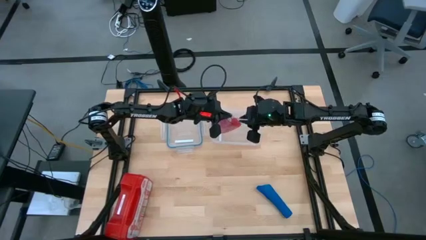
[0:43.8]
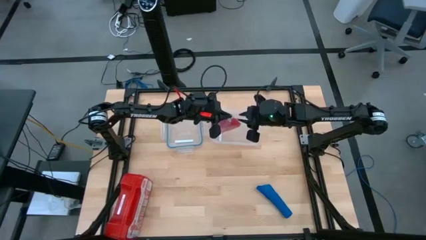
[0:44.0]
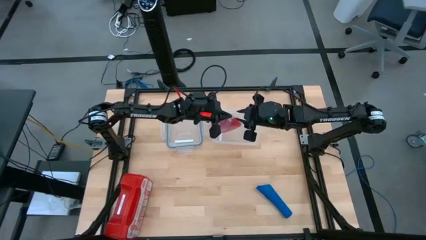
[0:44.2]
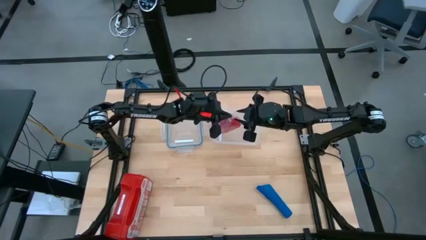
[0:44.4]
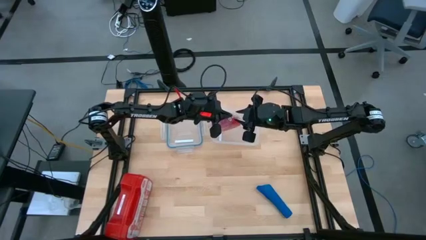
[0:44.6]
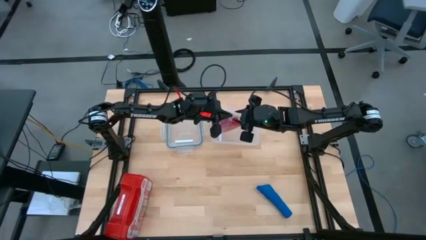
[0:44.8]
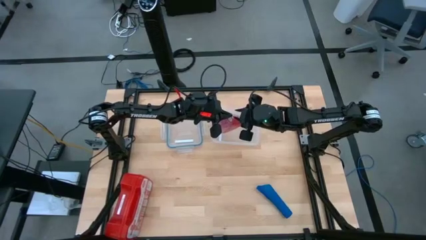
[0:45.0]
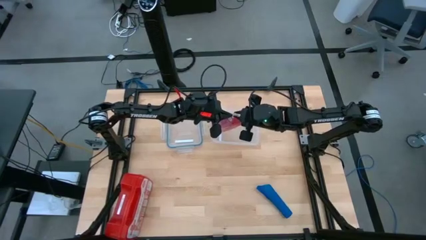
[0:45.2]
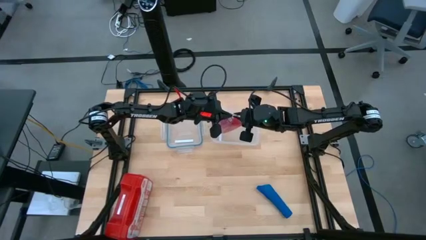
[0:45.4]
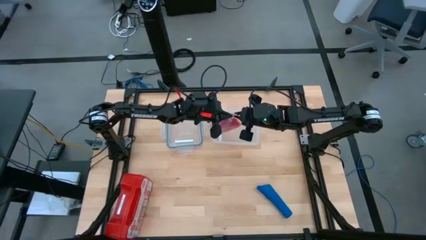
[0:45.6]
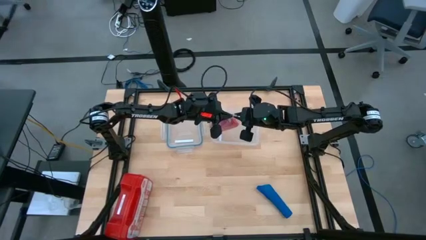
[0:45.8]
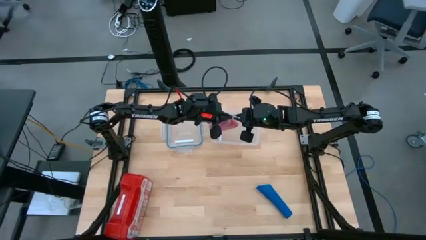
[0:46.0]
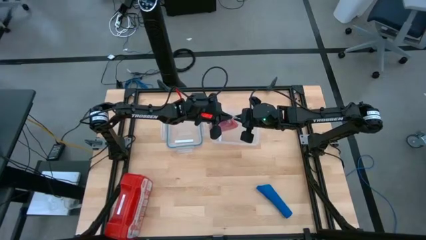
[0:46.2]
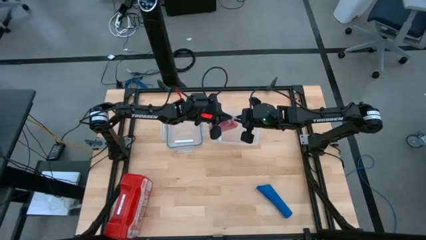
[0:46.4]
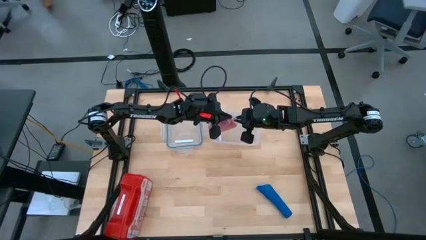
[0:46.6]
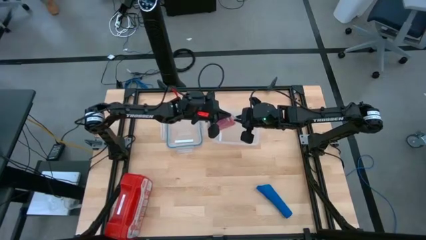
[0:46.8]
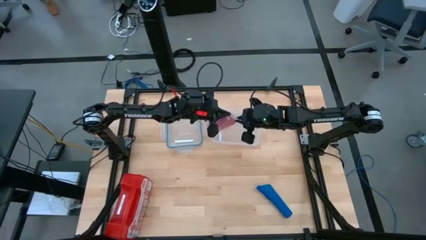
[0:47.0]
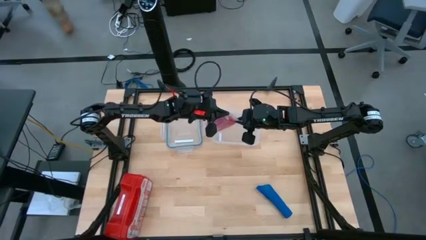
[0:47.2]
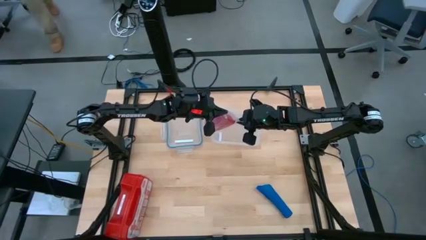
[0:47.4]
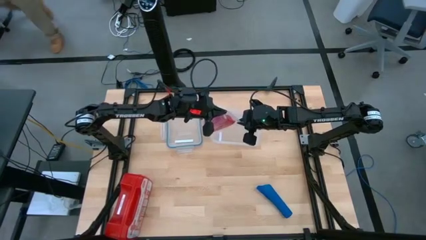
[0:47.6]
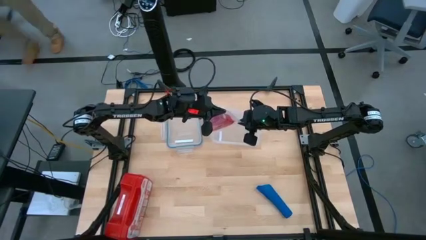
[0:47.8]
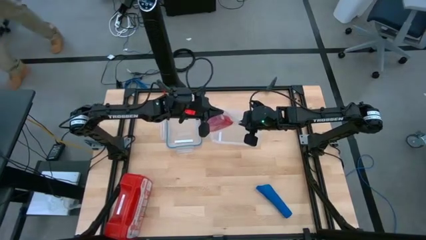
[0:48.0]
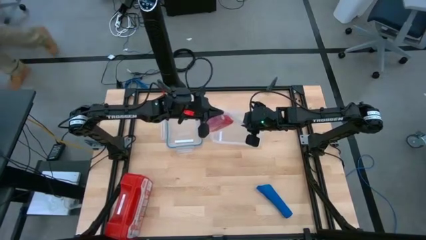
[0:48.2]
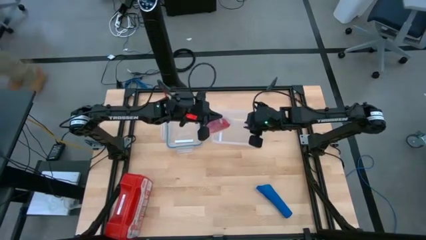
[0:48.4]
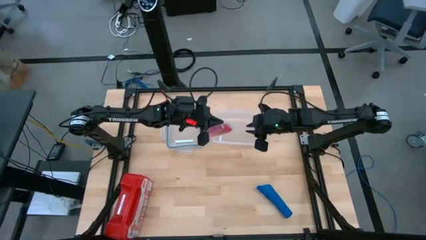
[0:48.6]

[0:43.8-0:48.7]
Task: Roll bandage
Open the transparent zip bag

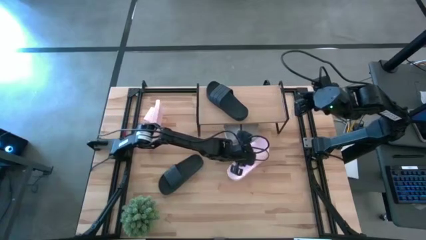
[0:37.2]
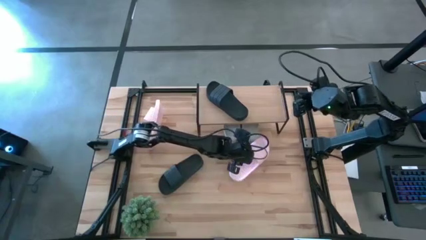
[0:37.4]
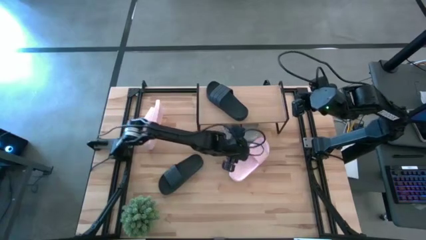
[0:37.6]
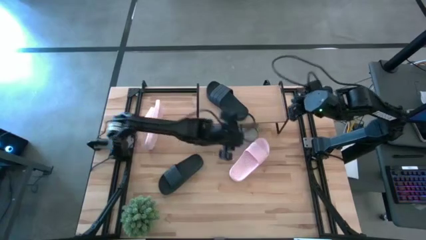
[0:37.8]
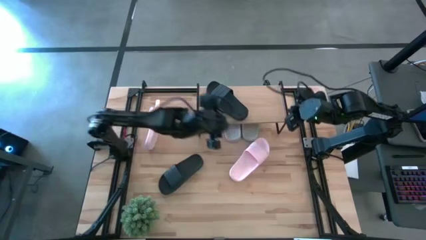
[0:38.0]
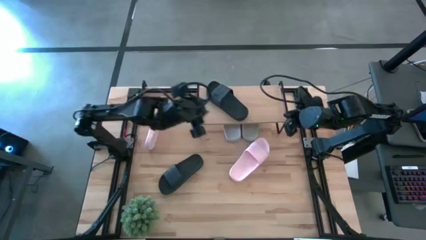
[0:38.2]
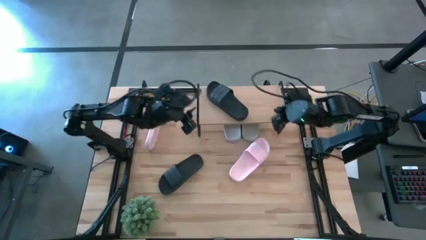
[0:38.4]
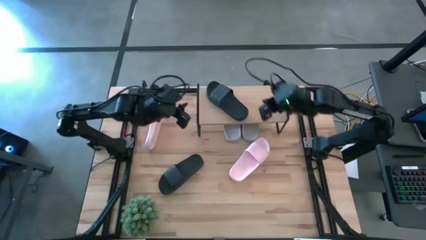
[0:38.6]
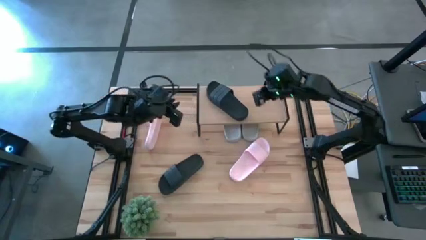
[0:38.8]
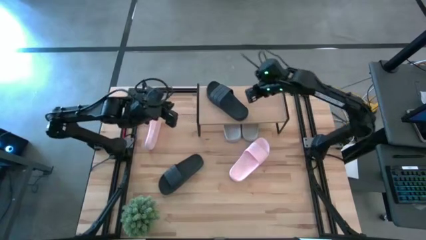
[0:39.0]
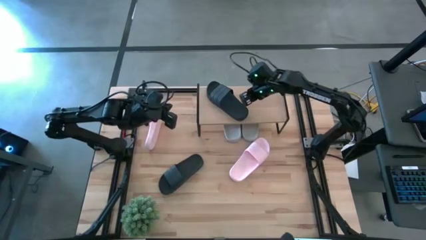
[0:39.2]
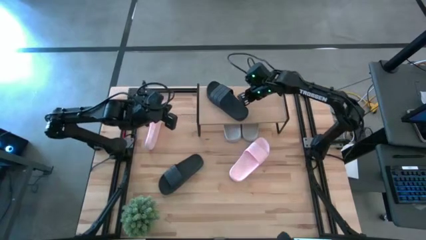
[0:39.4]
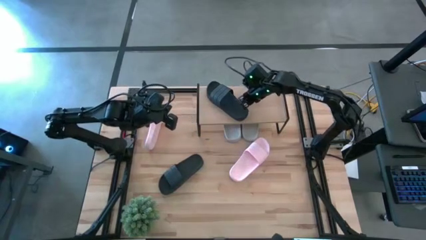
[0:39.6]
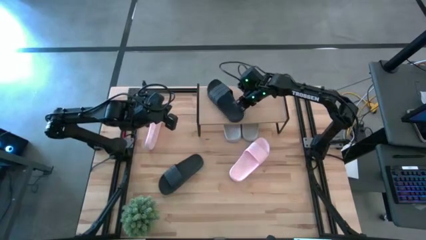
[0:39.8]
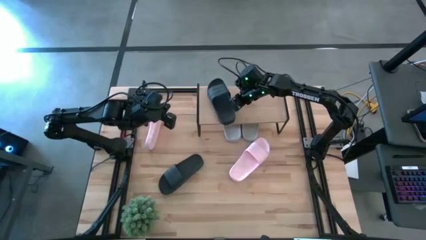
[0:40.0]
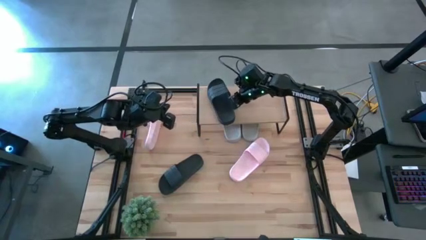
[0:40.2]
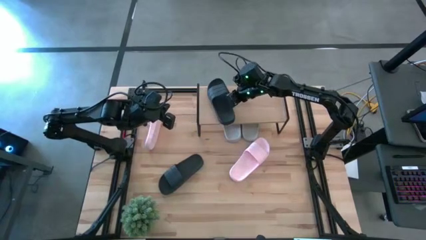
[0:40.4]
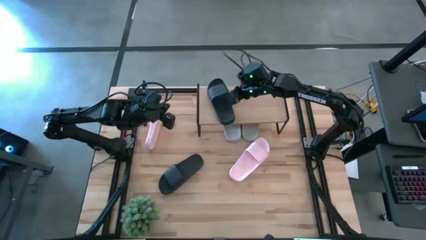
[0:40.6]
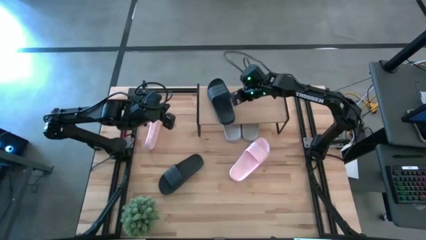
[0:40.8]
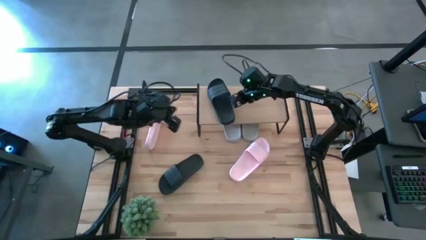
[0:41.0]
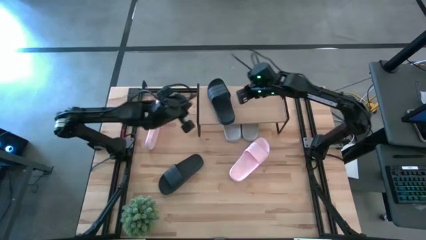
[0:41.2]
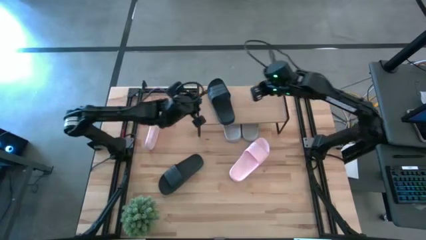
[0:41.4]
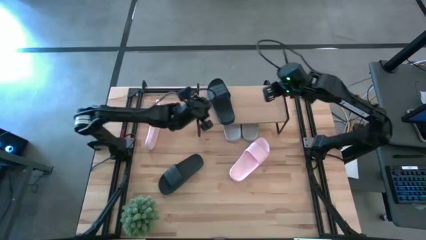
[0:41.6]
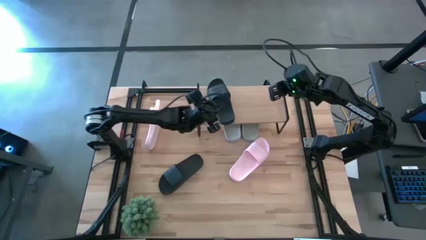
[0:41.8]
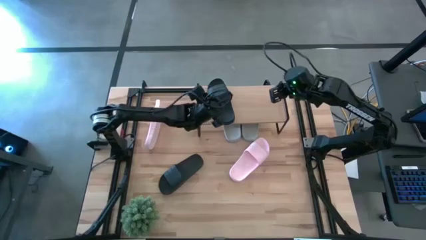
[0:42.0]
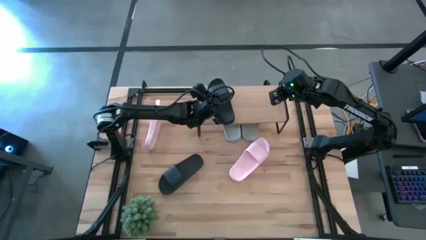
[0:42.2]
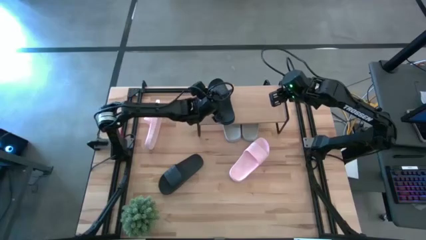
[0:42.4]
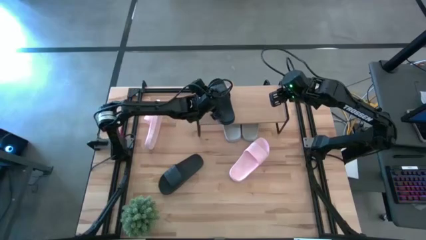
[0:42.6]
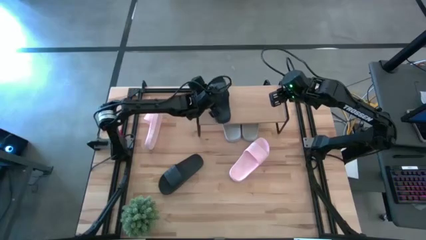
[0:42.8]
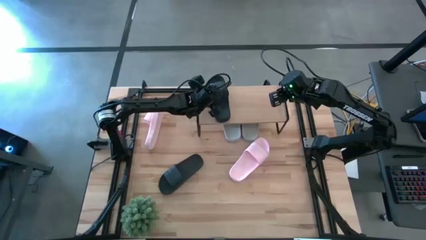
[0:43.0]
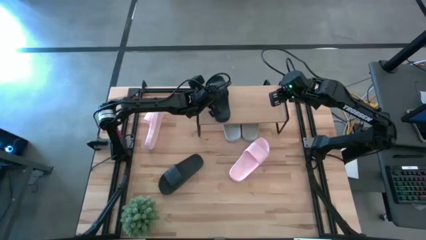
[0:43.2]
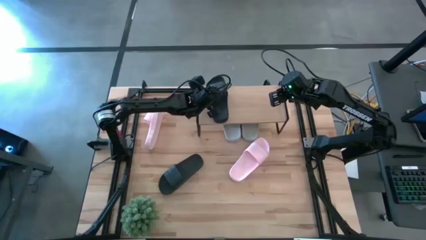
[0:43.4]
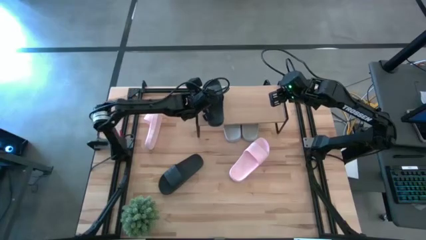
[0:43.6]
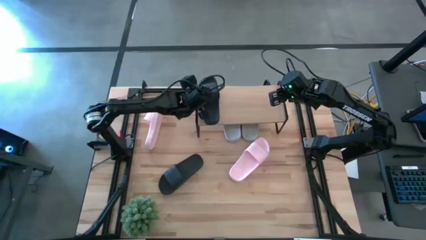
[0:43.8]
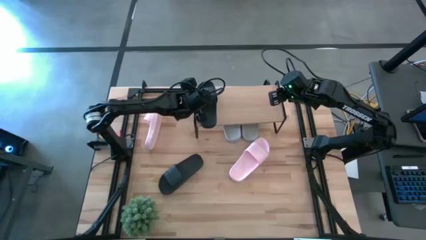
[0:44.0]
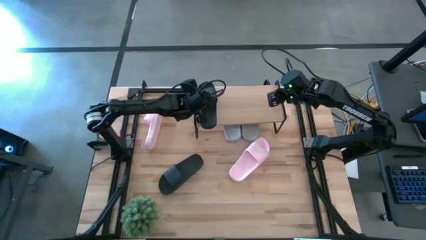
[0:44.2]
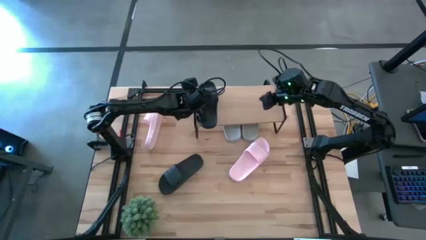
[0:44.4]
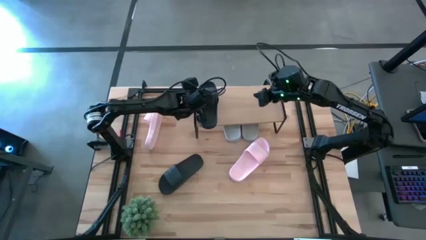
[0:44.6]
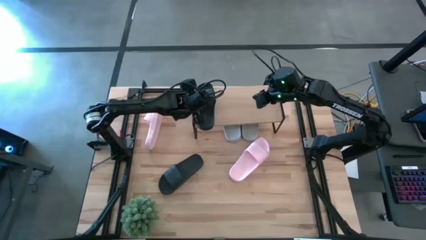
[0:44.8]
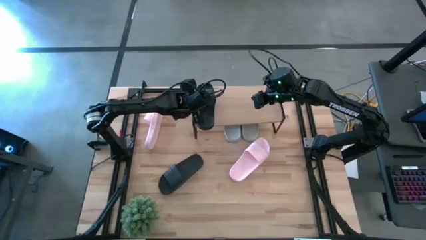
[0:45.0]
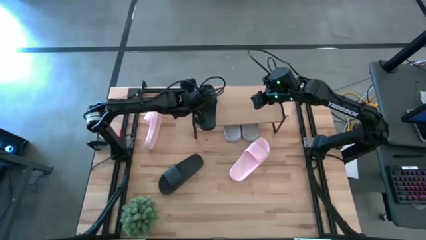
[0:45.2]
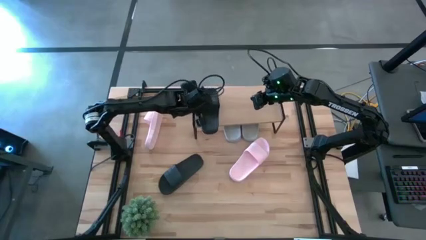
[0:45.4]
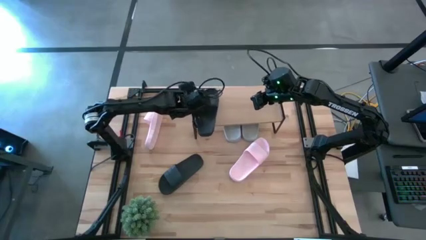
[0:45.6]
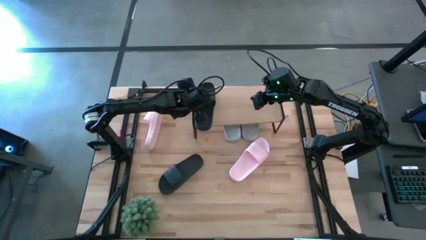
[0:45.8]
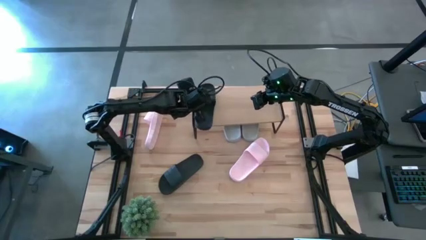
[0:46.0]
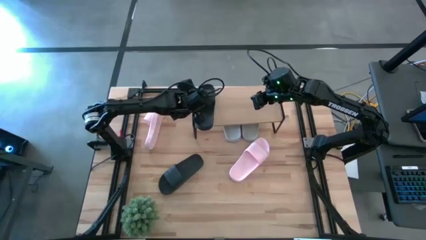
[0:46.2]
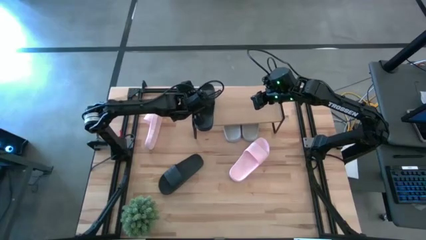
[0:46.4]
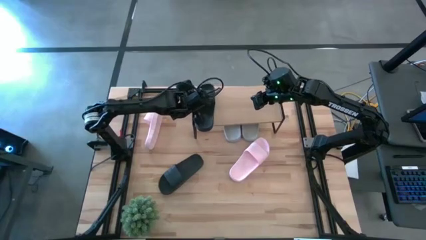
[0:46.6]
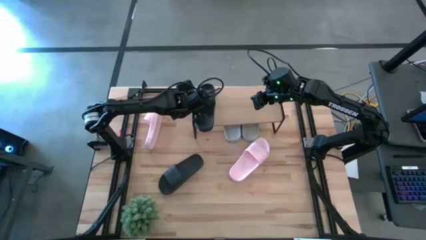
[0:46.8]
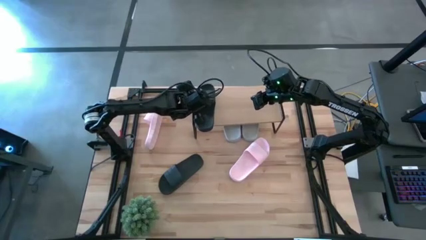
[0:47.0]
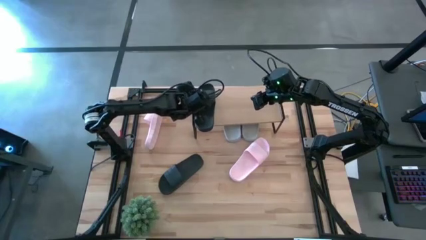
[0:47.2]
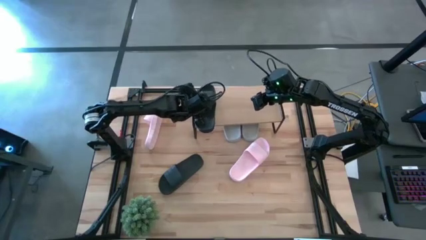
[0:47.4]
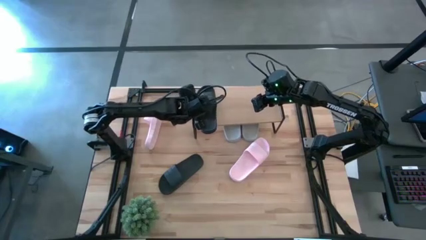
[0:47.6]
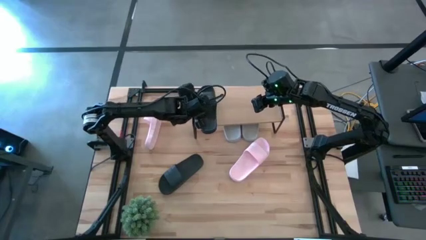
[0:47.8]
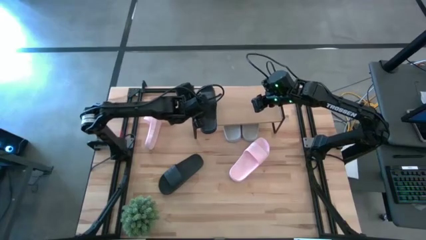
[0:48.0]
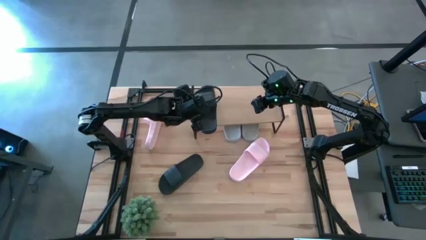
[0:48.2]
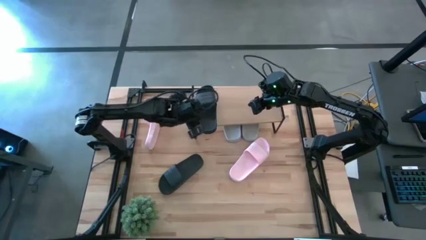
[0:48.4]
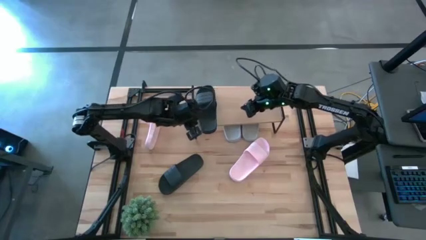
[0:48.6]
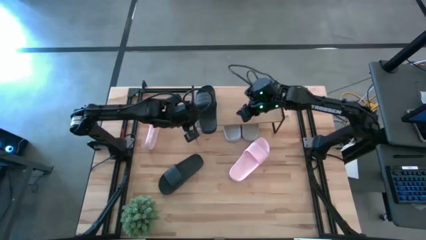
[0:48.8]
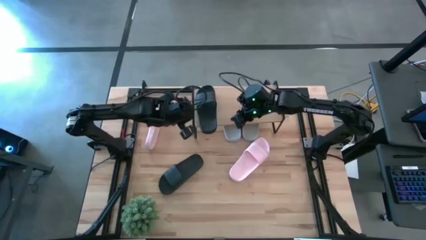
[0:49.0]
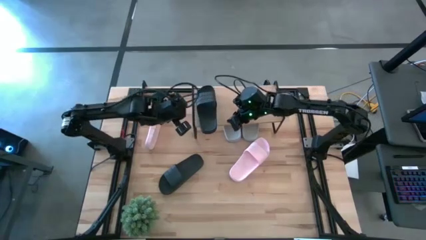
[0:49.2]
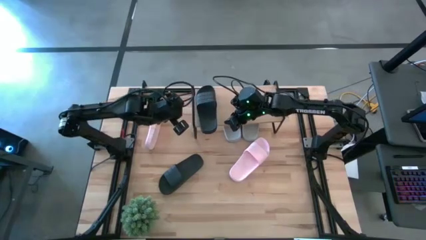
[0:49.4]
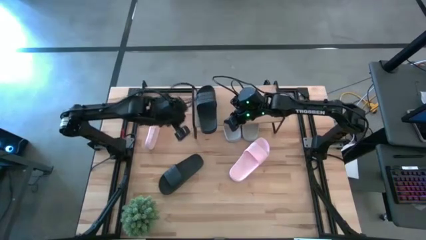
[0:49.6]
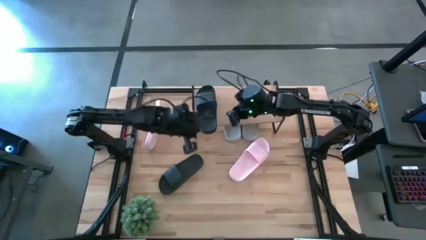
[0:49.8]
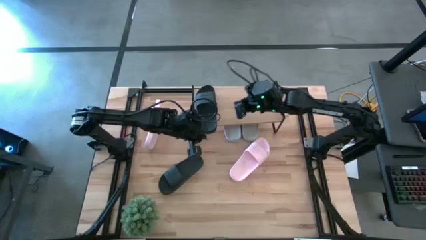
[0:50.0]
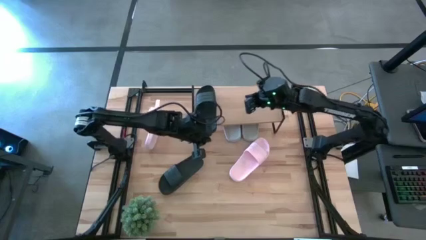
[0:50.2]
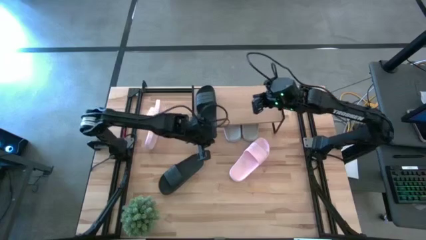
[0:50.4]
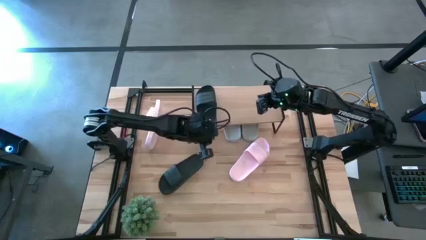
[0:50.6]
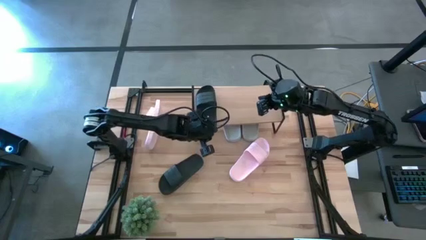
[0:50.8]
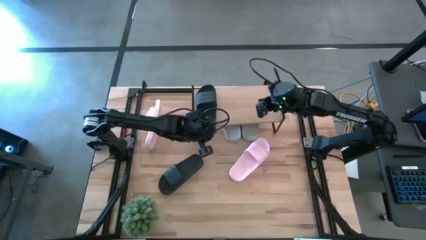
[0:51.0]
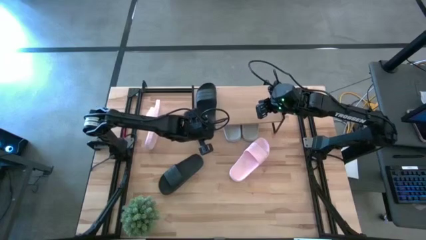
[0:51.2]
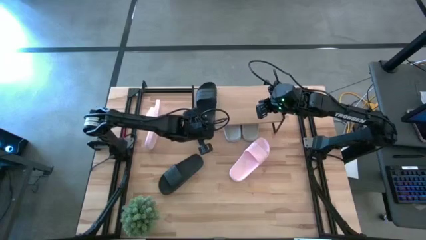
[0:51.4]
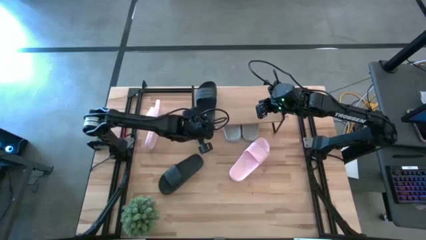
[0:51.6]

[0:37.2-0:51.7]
Task: Pick and place slides into the shelf
Adjust the black slide on the shelf
